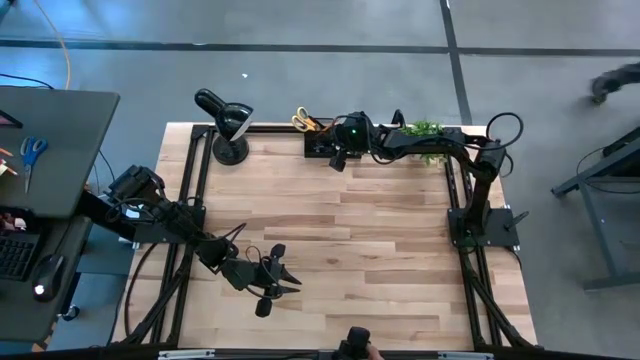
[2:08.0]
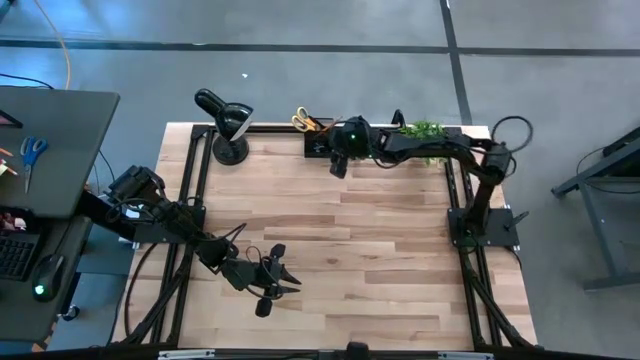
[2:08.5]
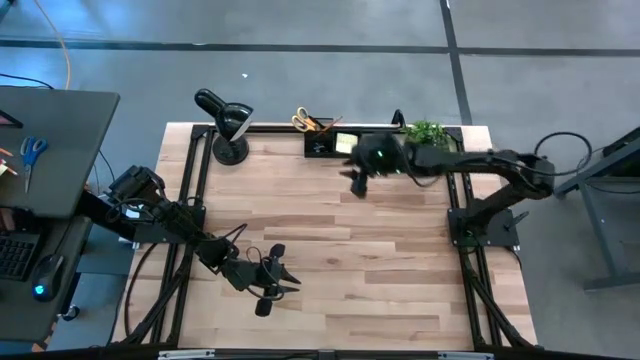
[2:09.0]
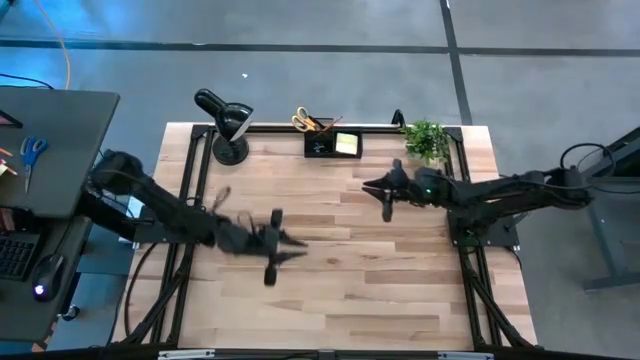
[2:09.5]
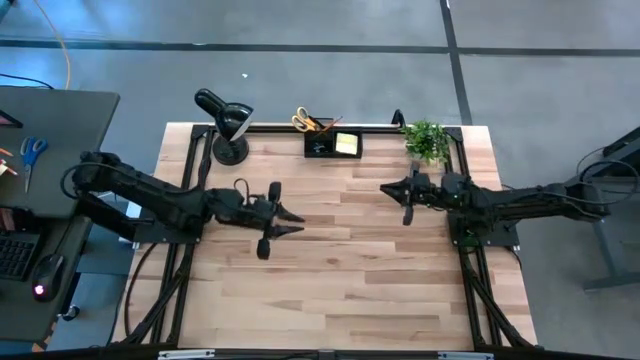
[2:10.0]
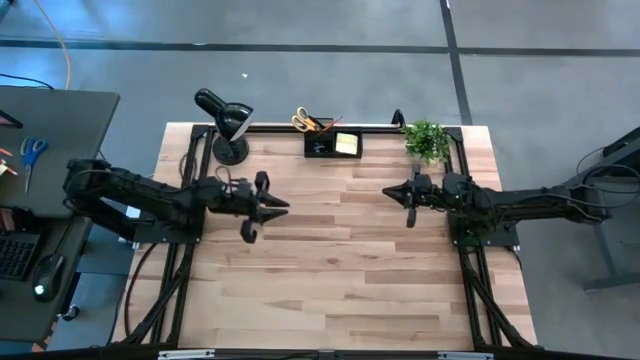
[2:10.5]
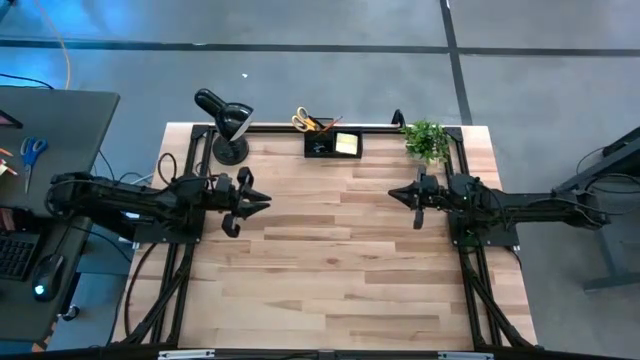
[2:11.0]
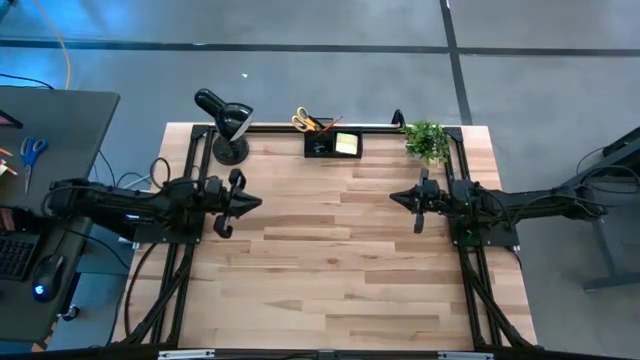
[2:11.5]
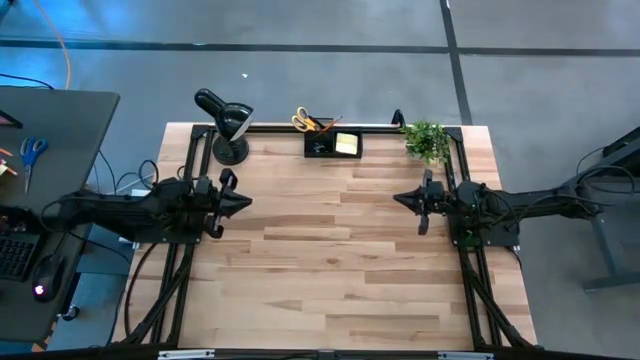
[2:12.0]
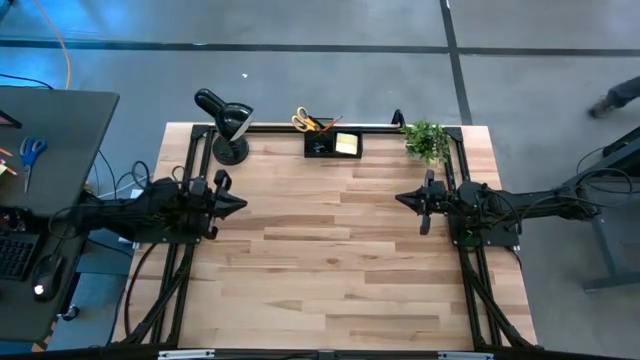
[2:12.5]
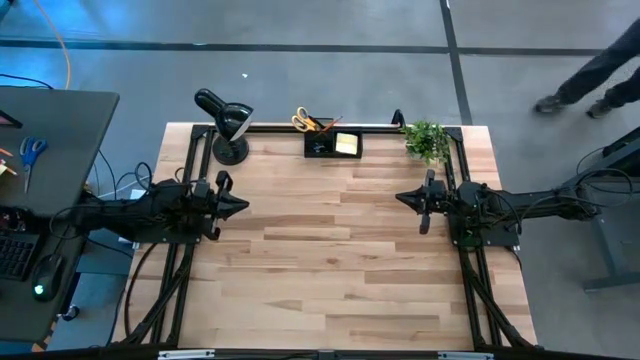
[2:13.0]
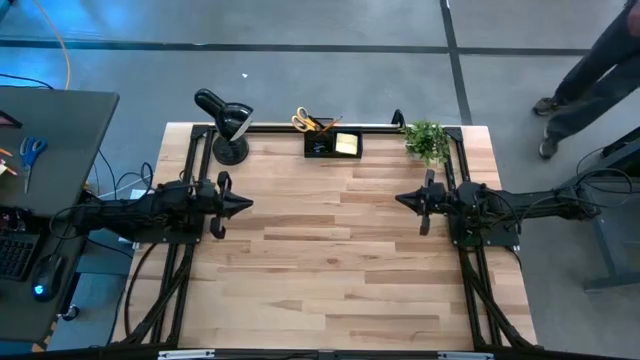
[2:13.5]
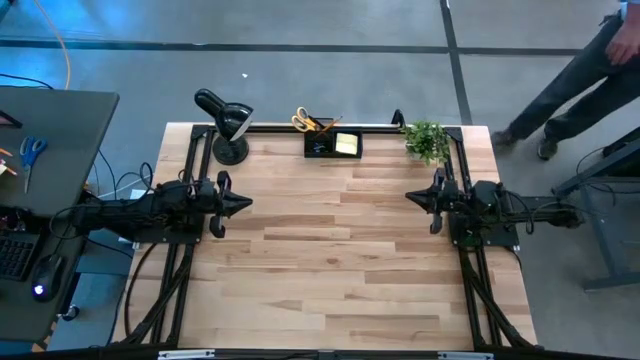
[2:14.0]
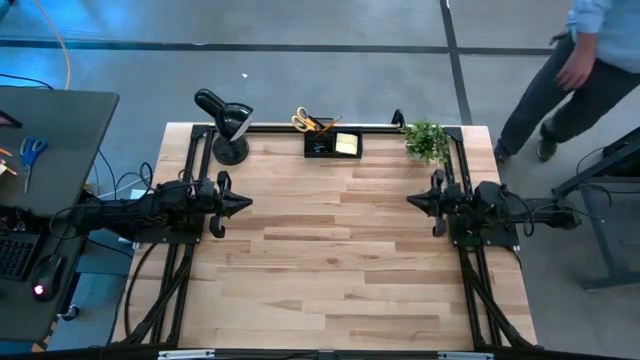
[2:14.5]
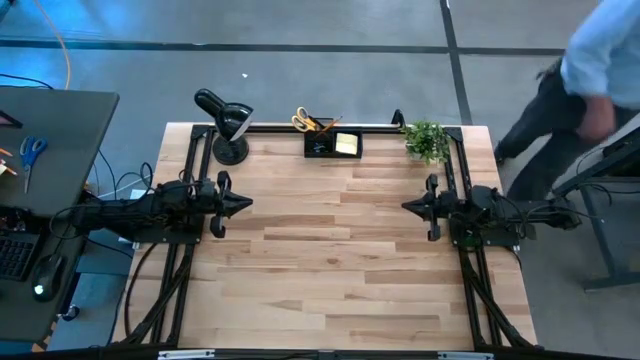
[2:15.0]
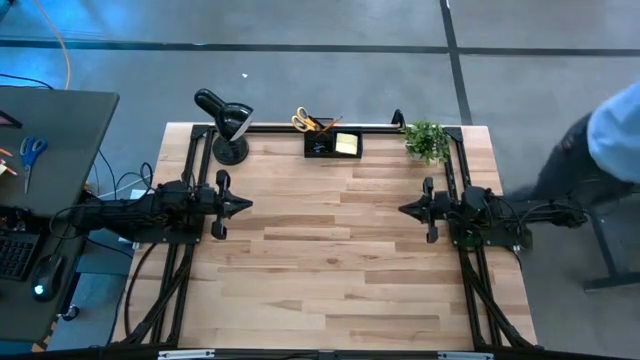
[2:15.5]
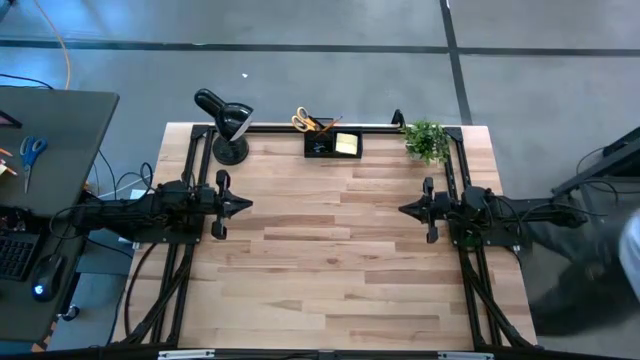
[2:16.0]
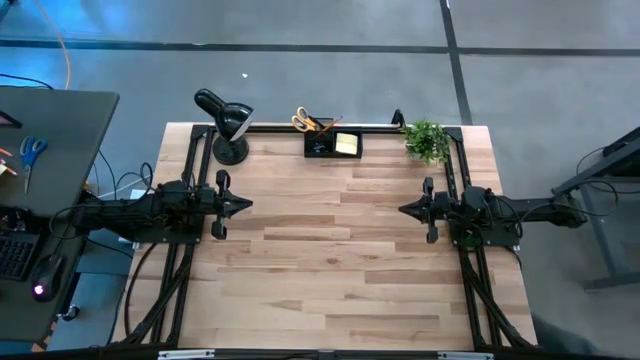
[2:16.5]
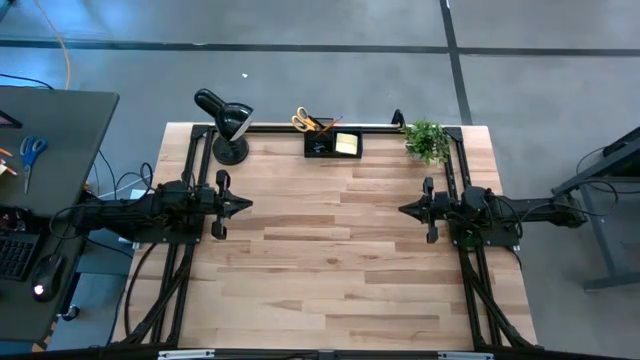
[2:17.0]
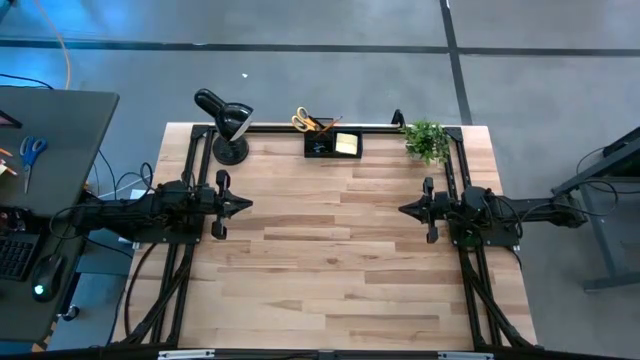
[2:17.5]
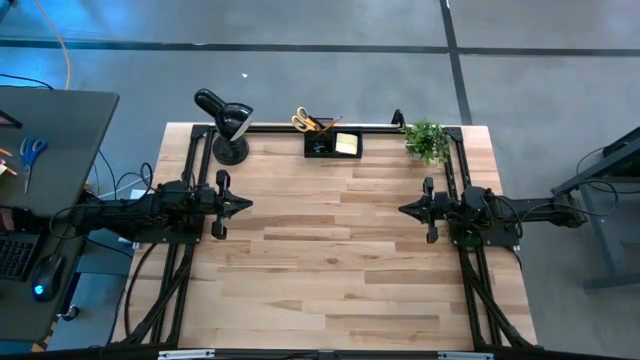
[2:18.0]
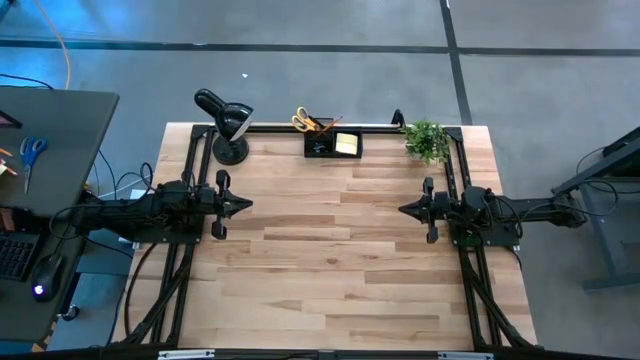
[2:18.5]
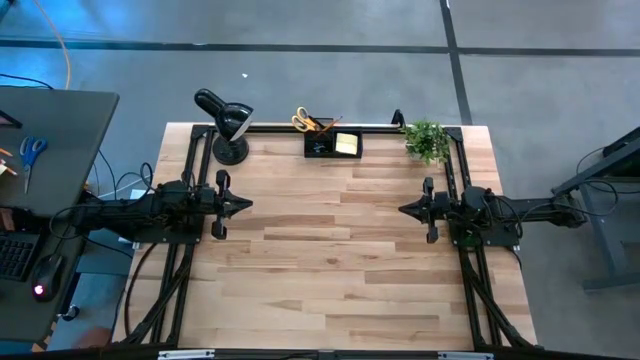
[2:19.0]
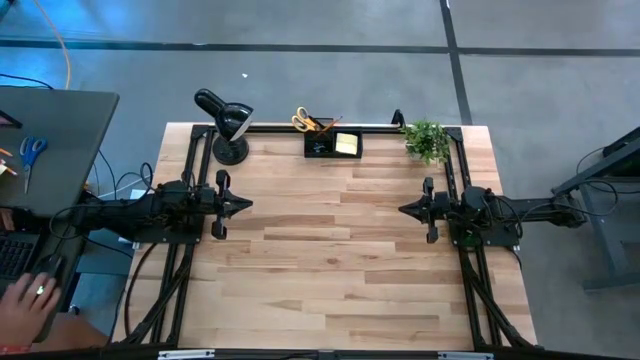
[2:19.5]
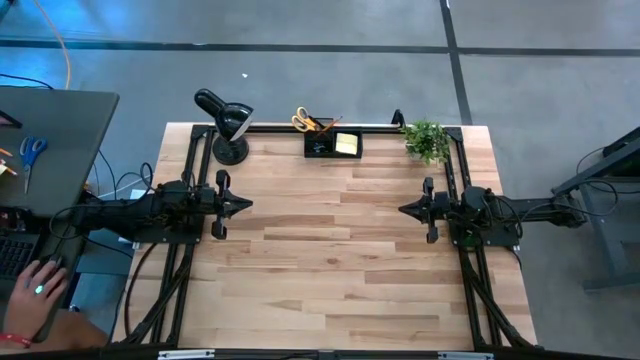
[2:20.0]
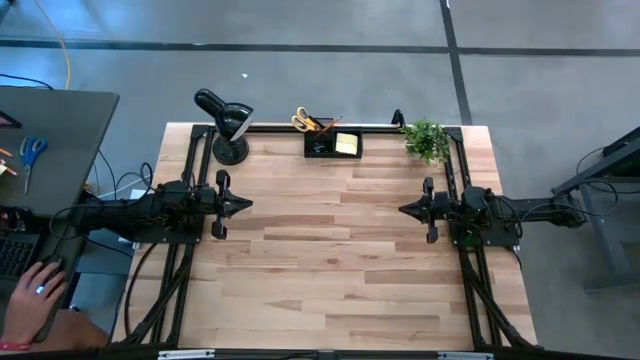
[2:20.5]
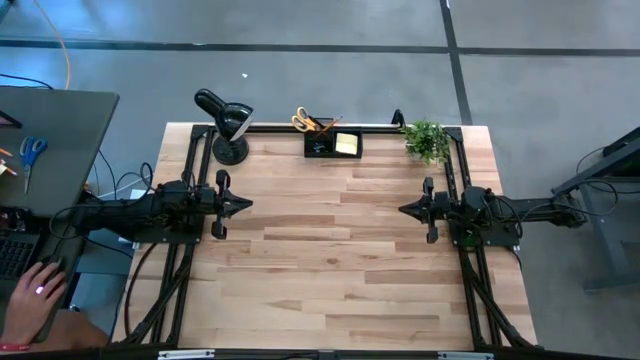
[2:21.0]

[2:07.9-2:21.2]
Task: Pick and place office supplies into organizer
Return to Home Position

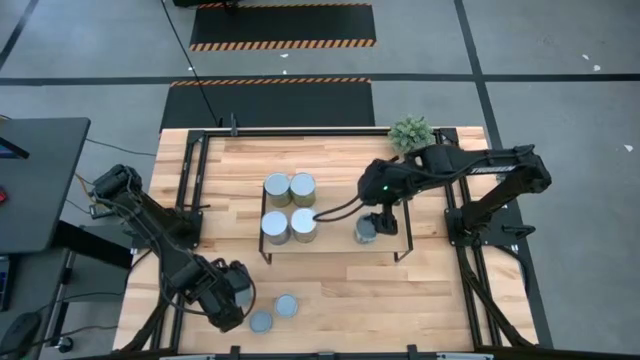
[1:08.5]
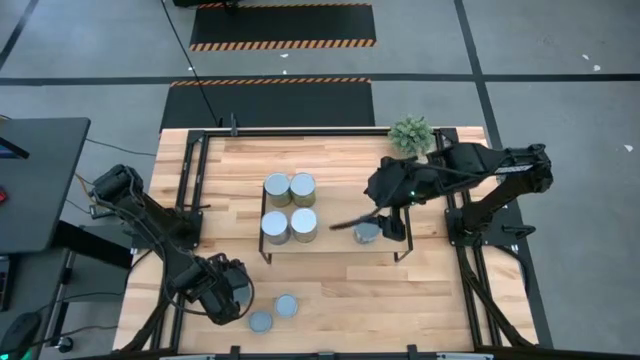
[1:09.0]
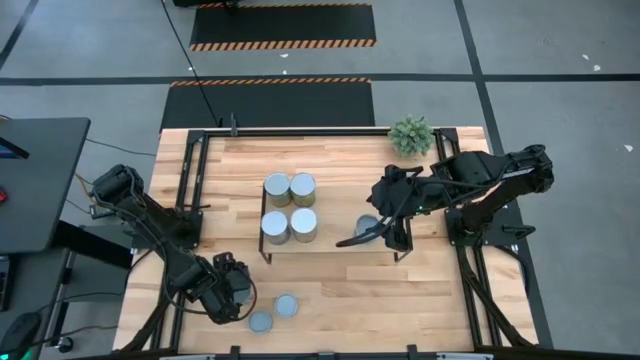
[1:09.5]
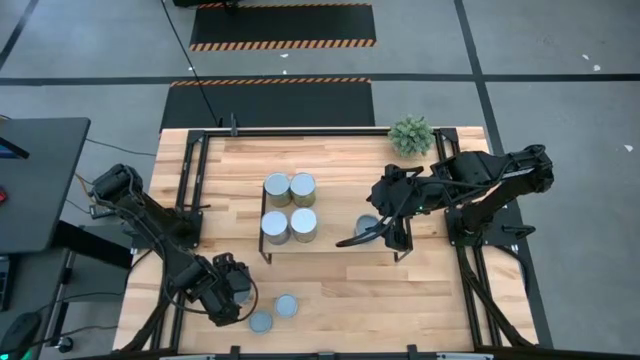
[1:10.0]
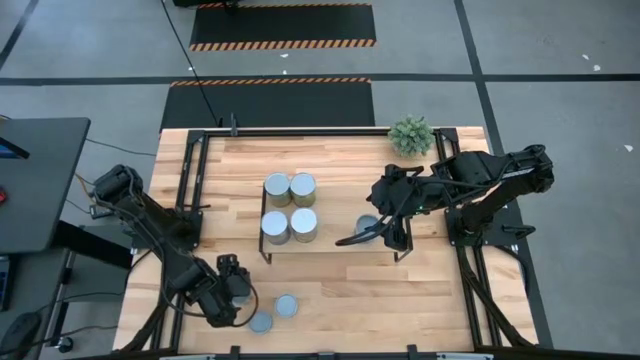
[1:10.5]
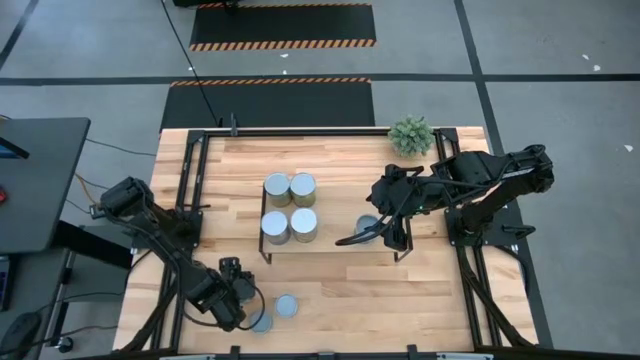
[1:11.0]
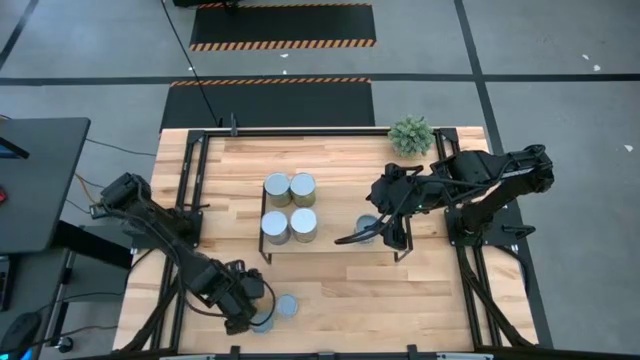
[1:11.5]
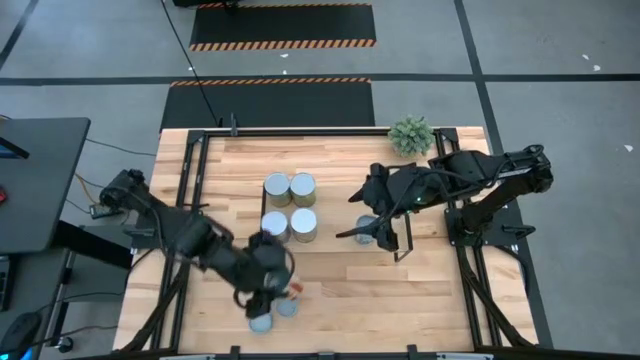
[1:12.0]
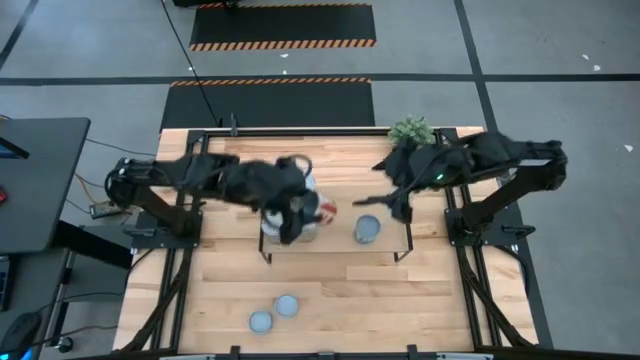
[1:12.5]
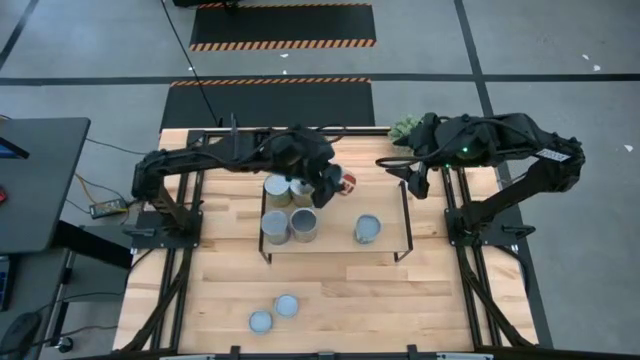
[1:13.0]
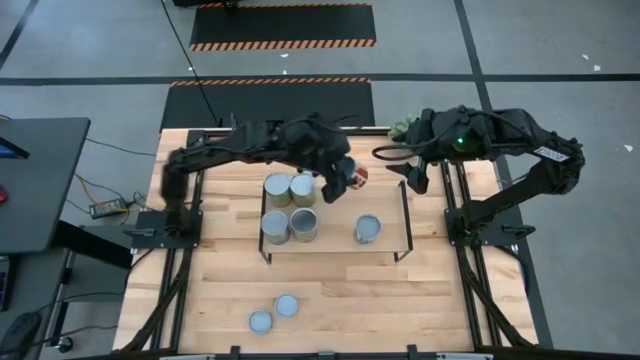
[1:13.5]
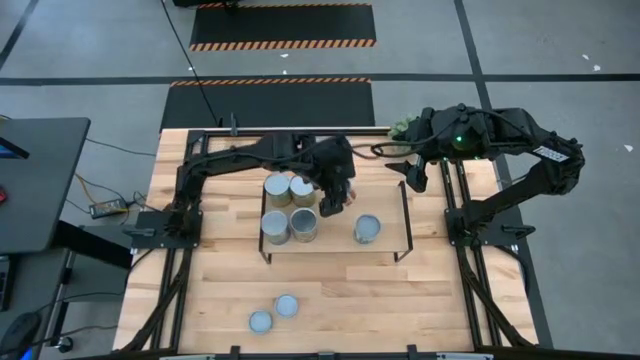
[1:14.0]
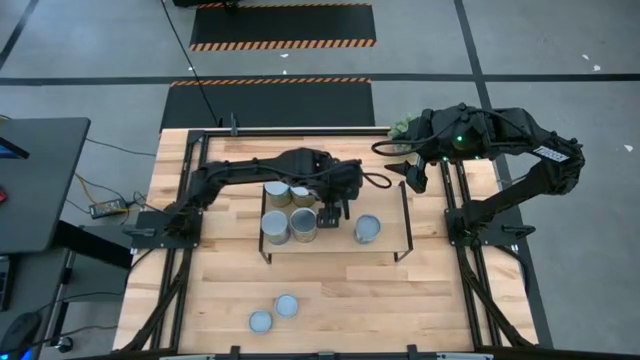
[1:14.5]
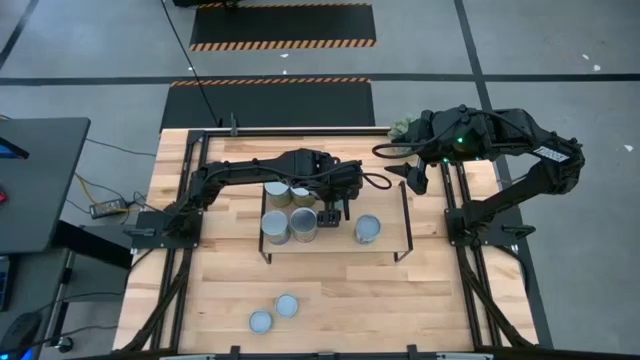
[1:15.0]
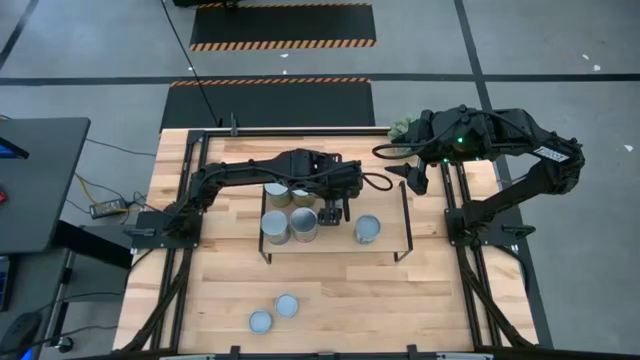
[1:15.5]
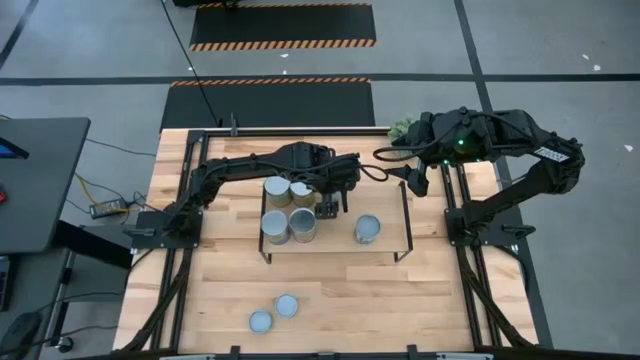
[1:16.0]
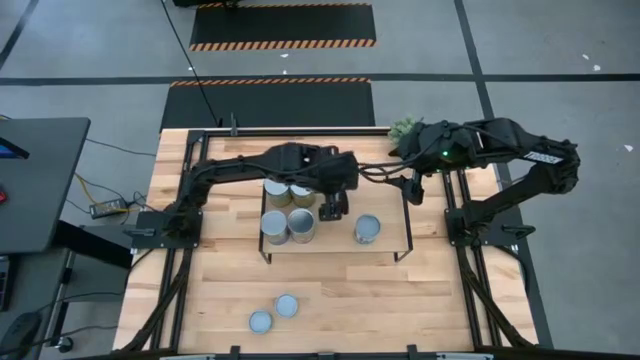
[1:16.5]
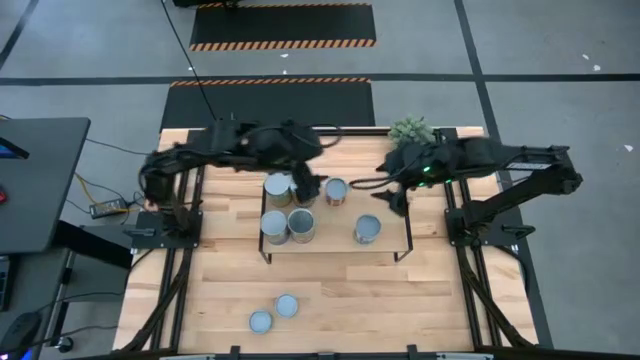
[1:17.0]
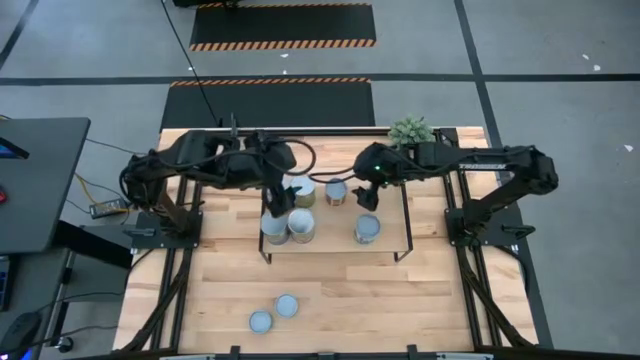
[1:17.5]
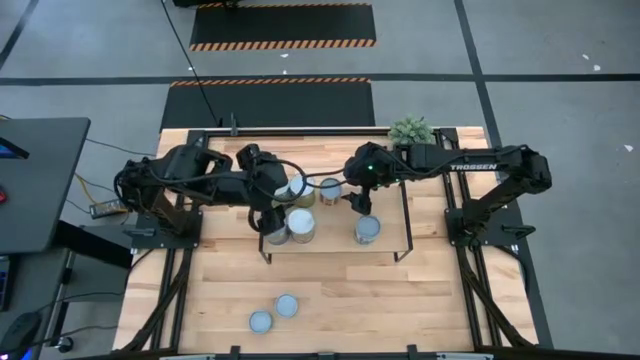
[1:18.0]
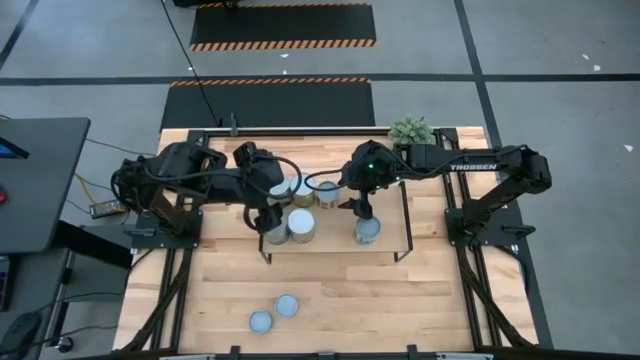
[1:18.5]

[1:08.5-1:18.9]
Task: Pick and place cans onto a shelf
Put the canned diced tomatoes on the shelf
